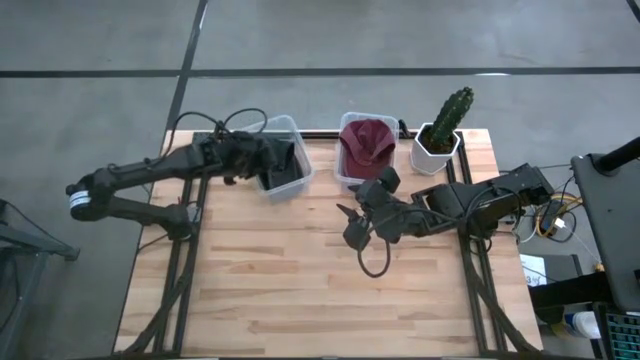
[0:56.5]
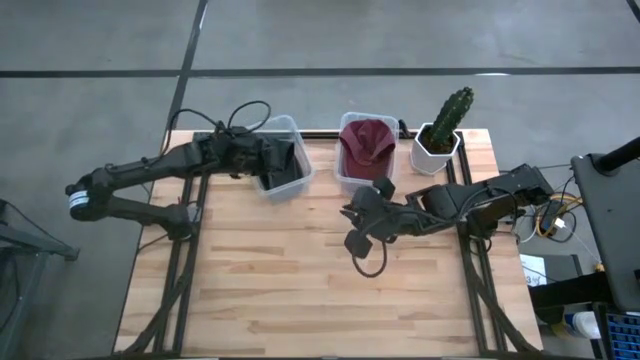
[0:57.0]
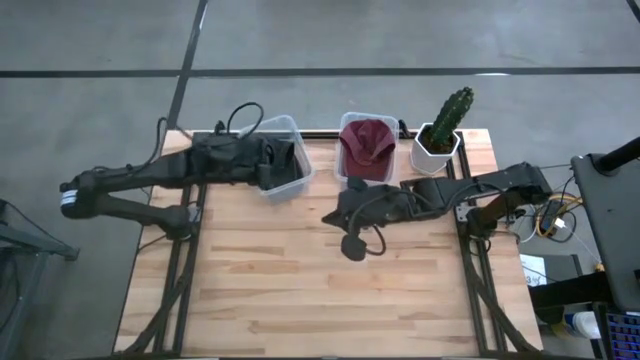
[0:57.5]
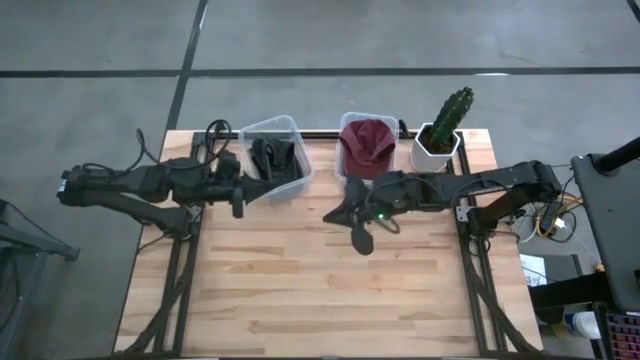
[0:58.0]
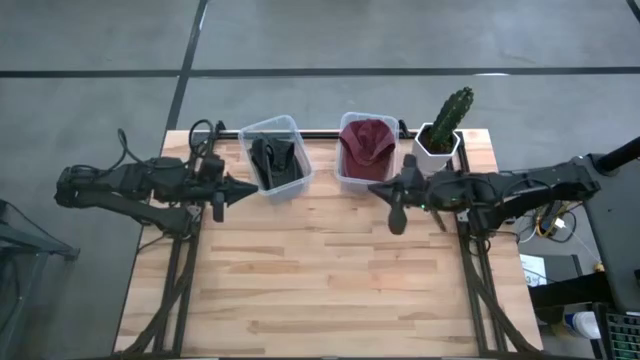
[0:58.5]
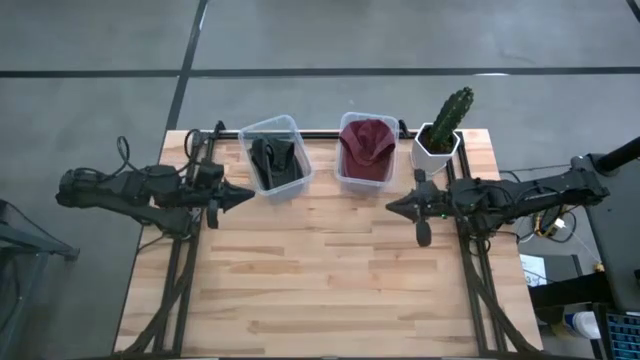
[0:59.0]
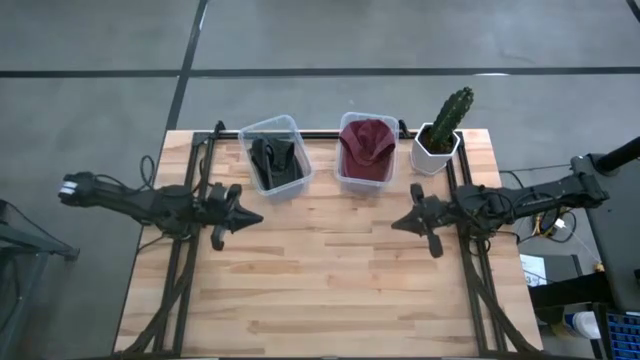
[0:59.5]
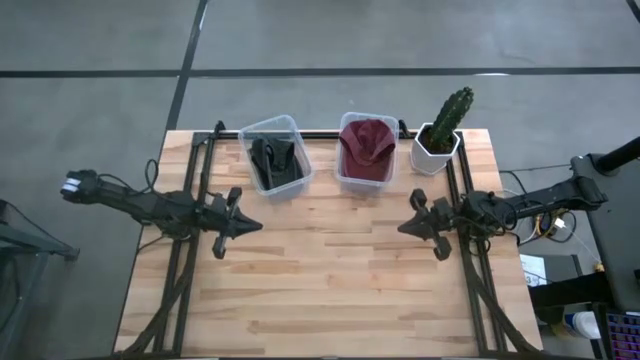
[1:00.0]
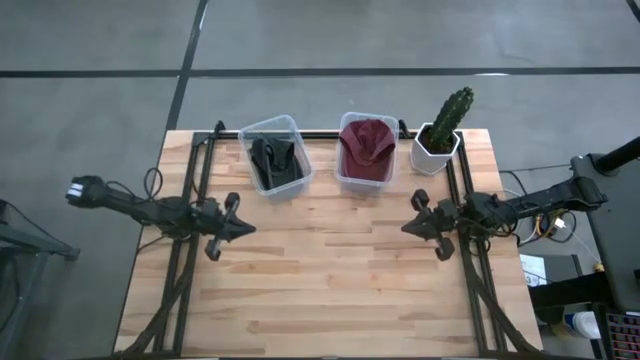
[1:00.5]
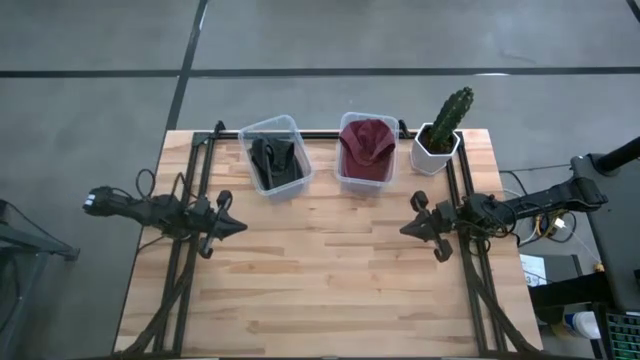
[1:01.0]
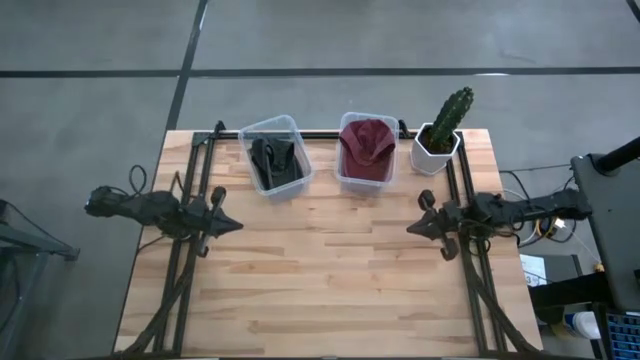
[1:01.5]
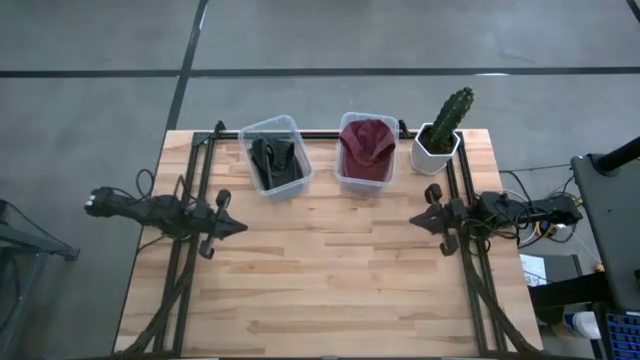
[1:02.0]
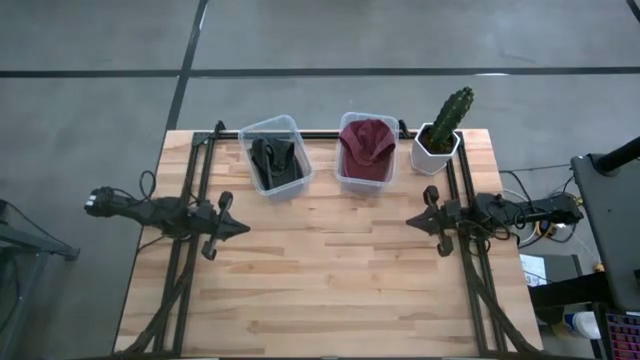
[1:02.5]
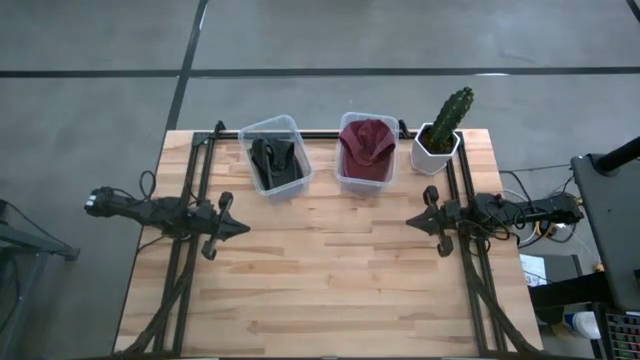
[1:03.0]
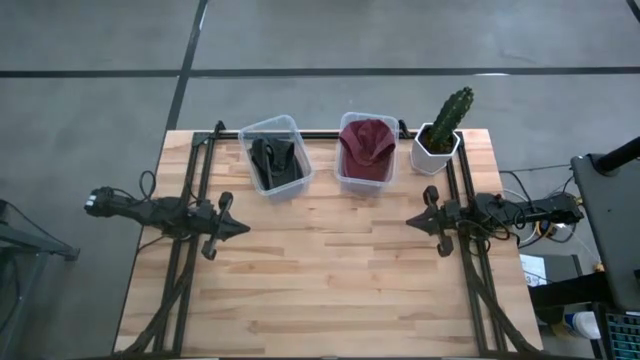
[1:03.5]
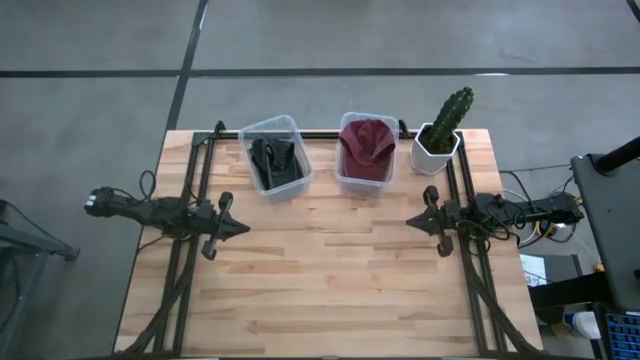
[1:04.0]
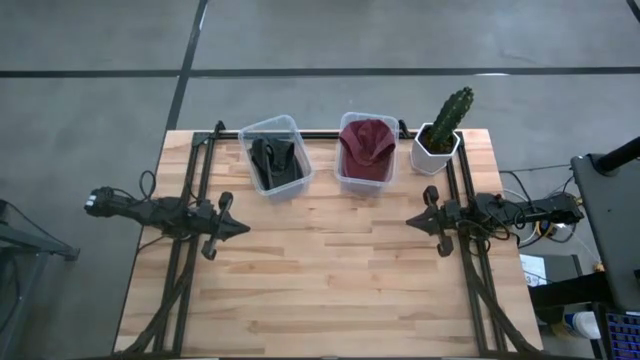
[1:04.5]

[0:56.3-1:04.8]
Task: Pick & Place hat
Return to Home Position

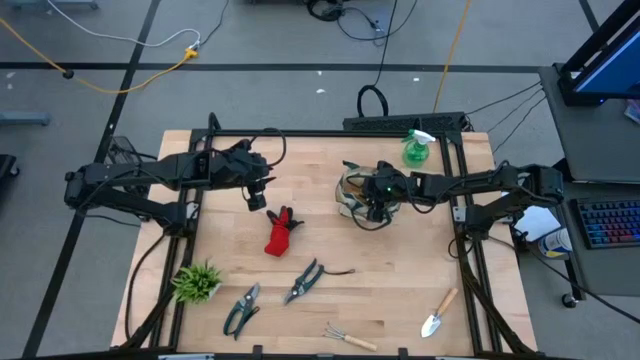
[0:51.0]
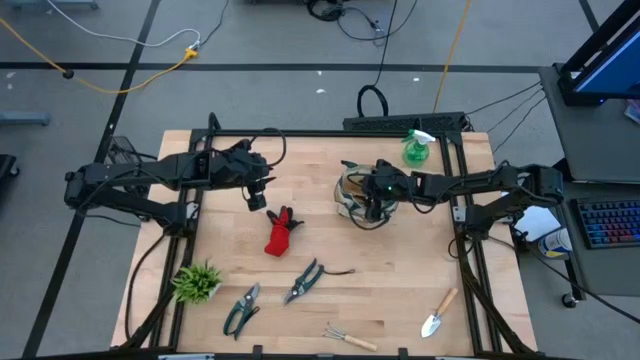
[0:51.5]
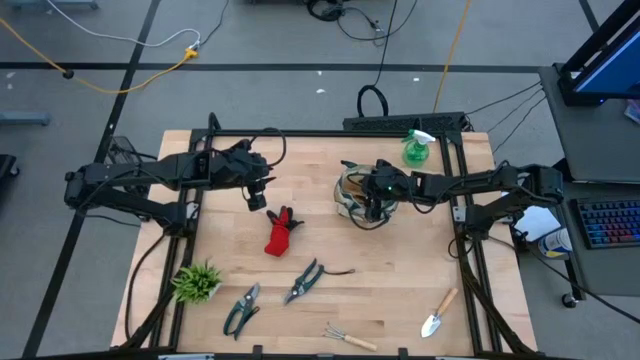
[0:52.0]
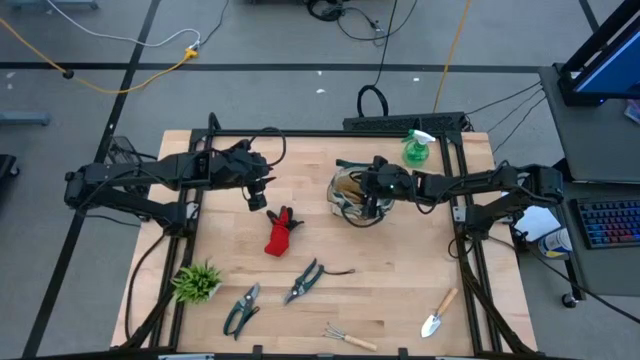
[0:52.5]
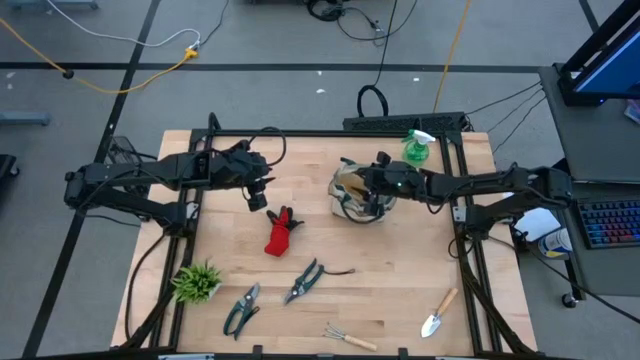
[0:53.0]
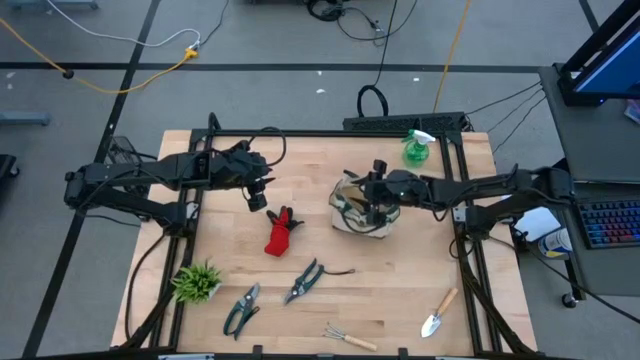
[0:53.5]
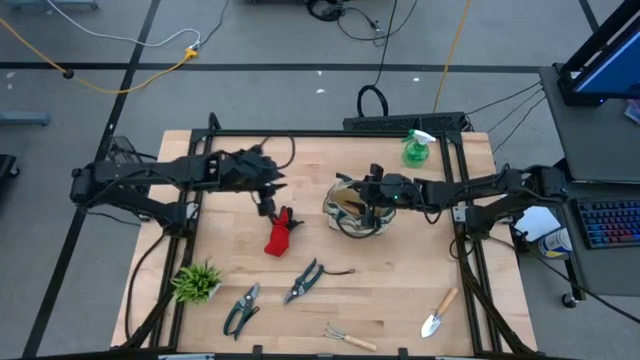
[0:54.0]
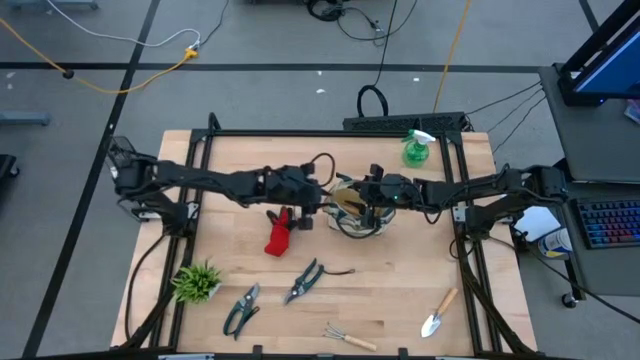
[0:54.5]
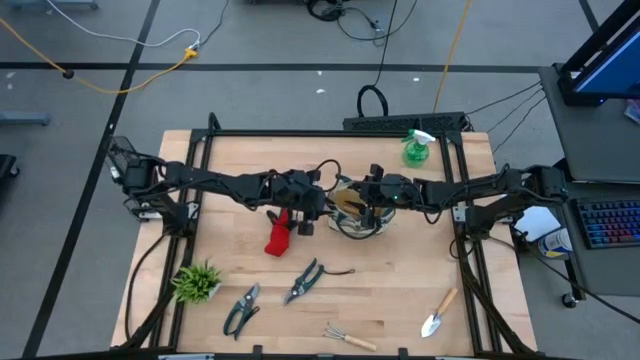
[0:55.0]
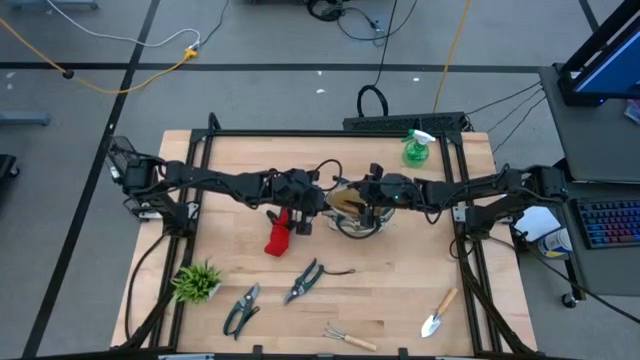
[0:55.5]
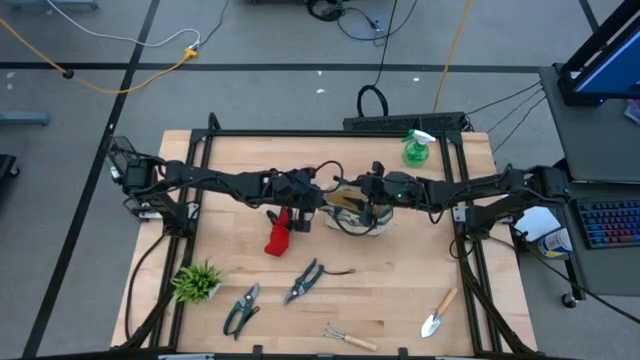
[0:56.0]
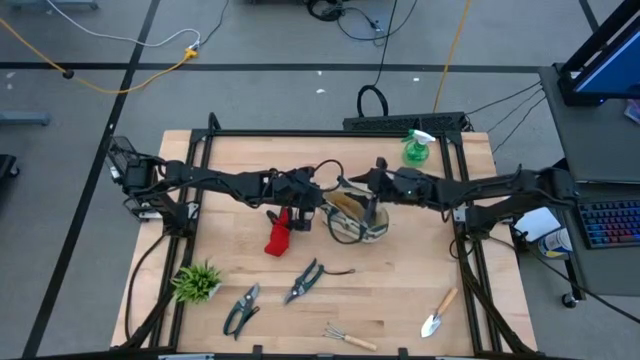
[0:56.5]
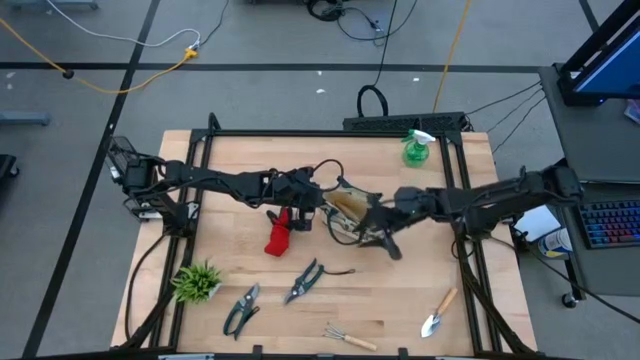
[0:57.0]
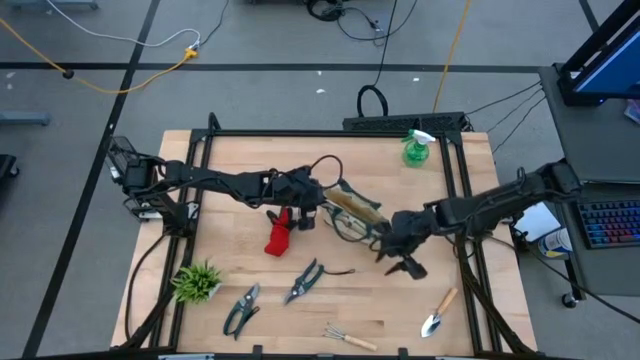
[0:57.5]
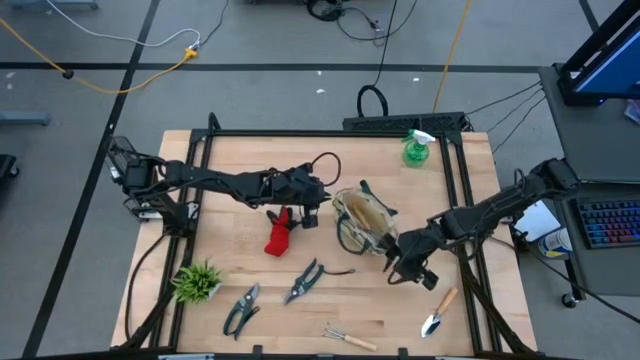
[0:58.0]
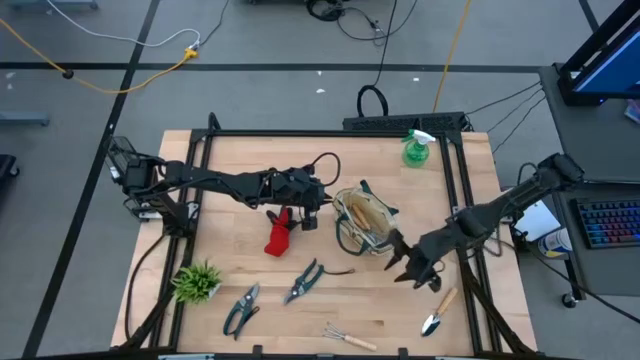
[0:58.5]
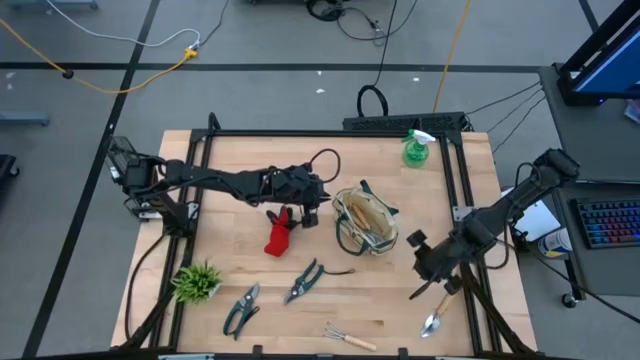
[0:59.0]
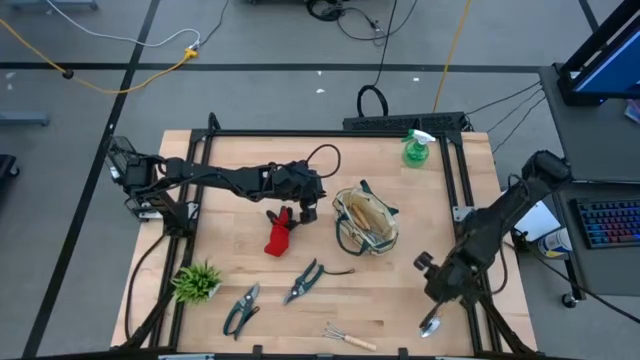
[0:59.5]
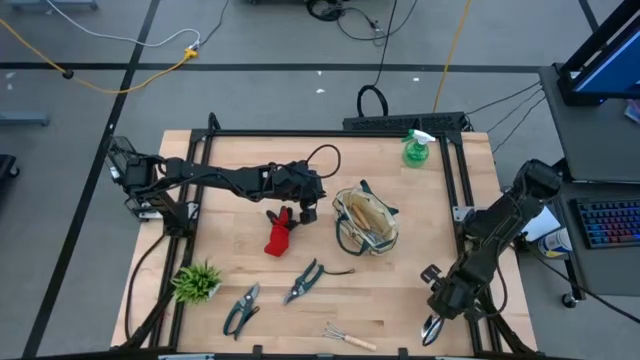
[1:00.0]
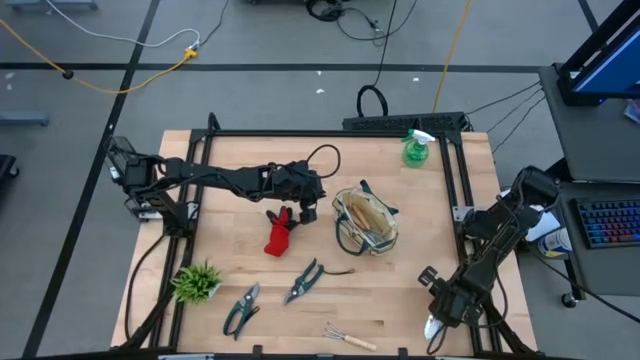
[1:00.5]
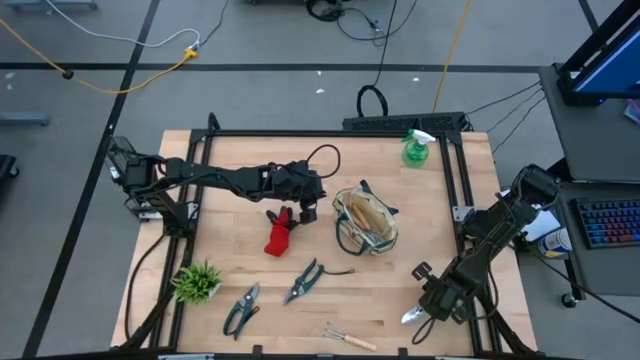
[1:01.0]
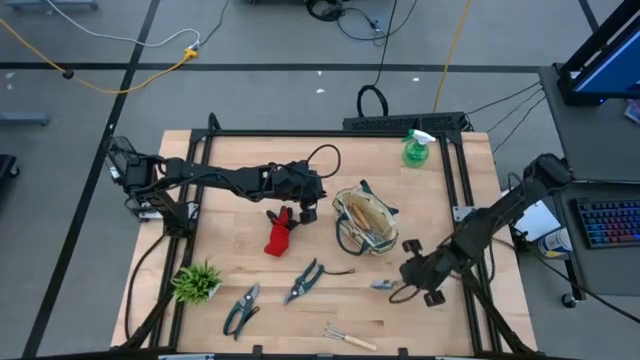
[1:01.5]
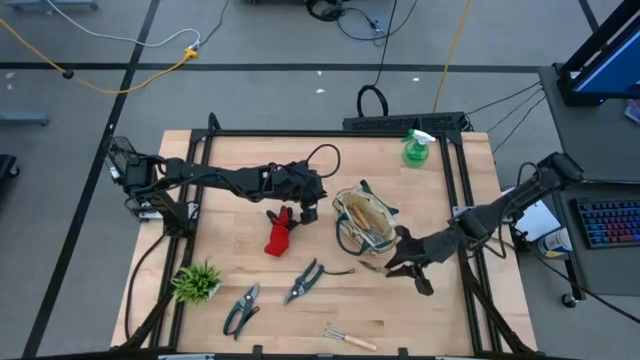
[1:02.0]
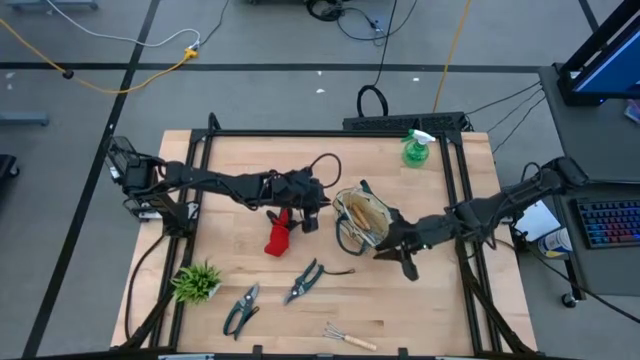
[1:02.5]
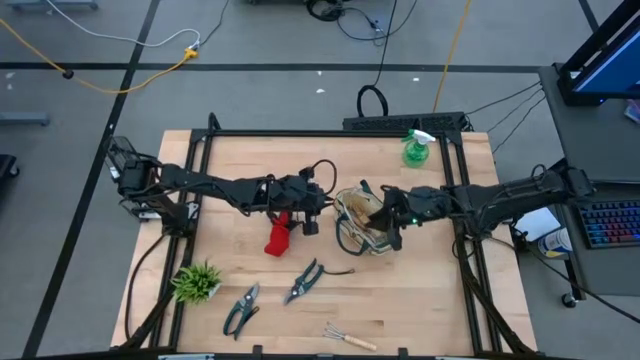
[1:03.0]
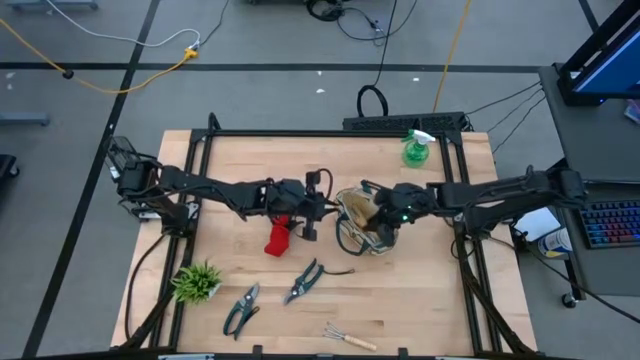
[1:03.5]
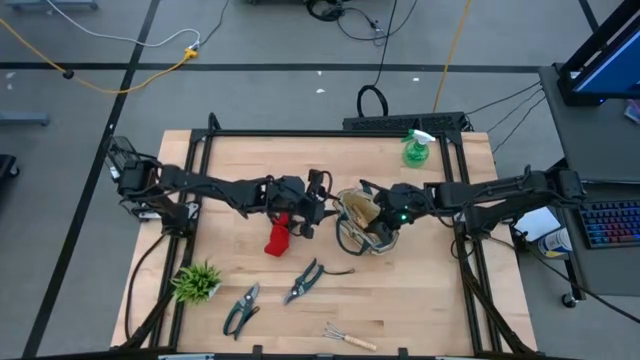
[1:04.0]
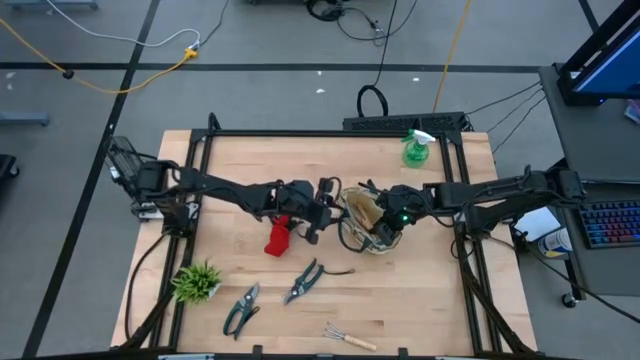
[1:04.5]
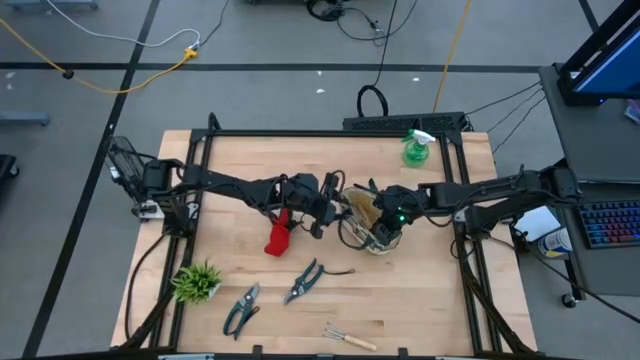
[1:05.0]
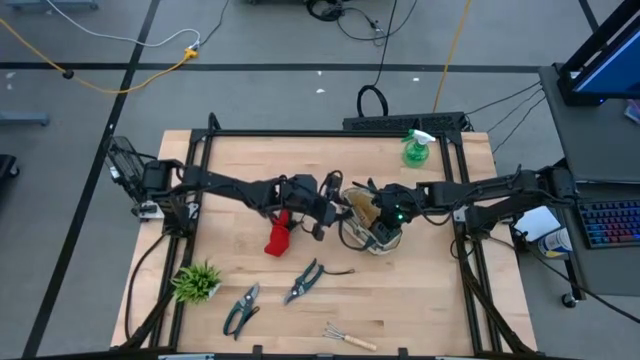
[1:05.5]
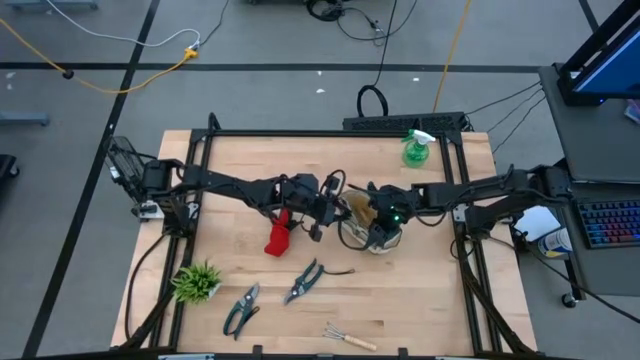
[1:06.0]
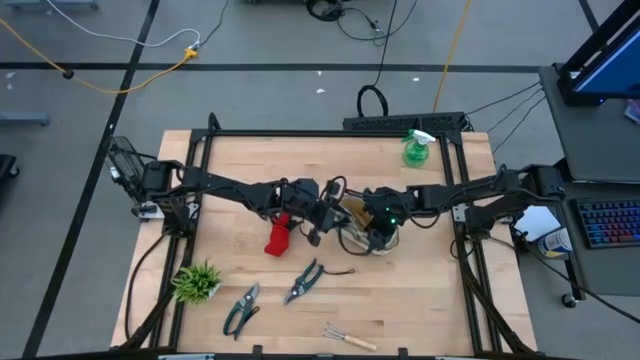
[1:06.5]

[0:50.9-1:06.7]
Task: Pick & Place Garden tools in Gardening bag
Put the brow trowel into the gardening bag
